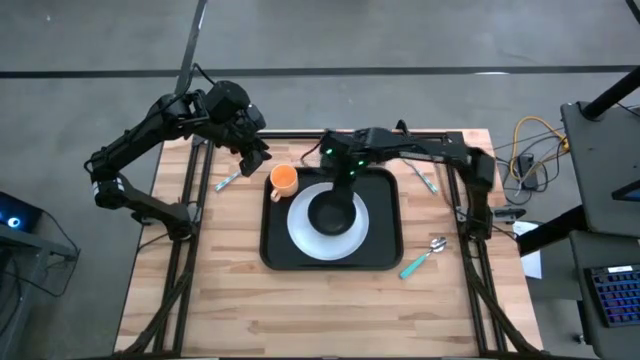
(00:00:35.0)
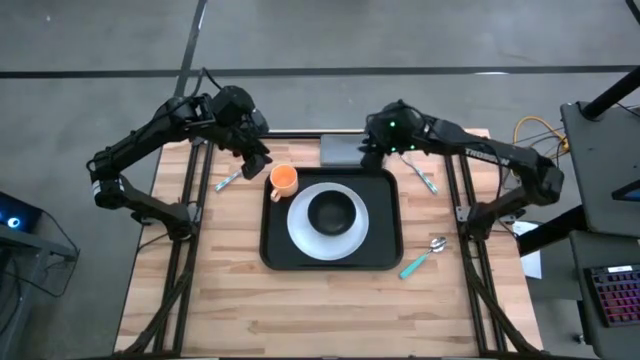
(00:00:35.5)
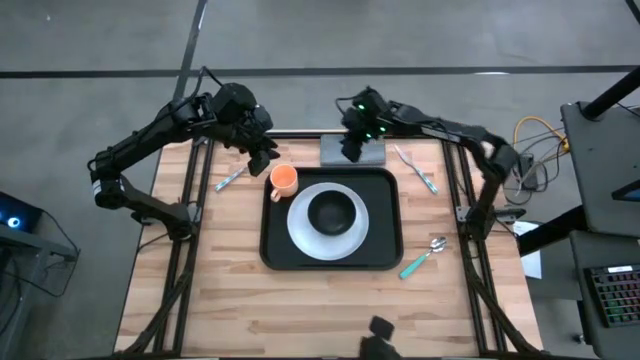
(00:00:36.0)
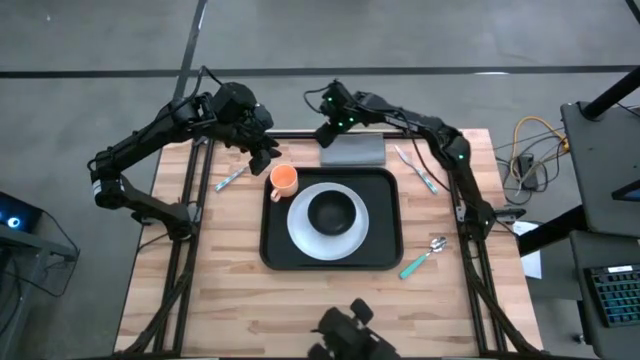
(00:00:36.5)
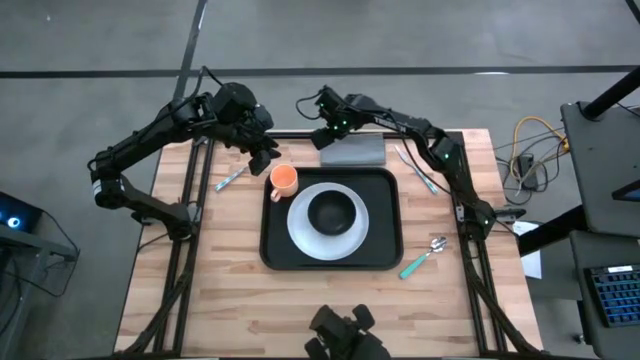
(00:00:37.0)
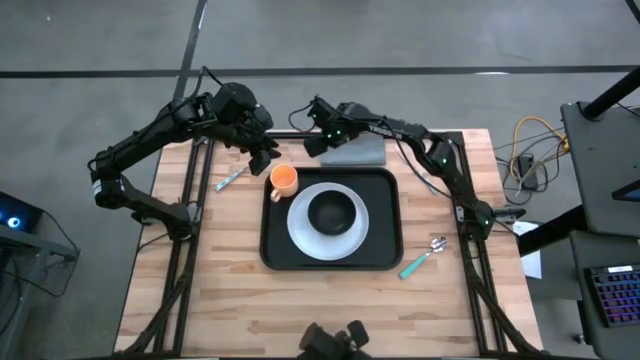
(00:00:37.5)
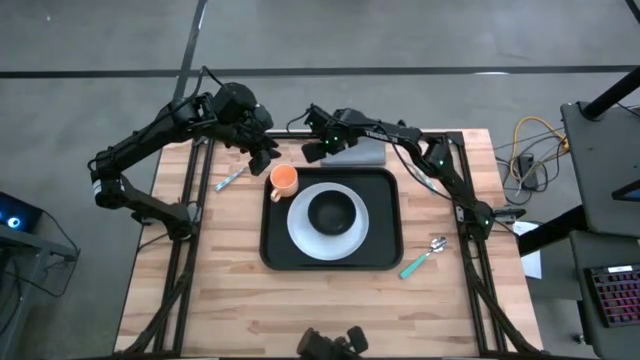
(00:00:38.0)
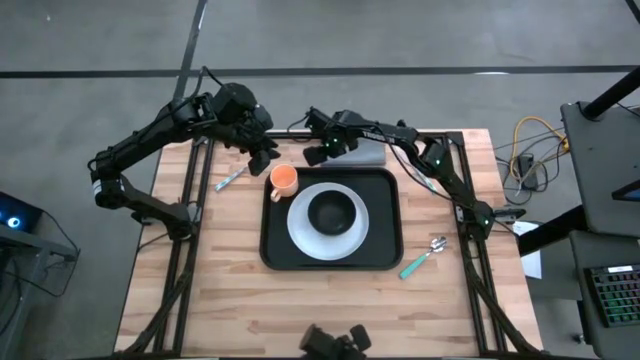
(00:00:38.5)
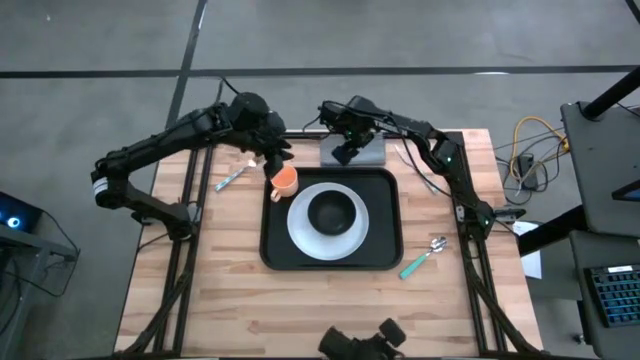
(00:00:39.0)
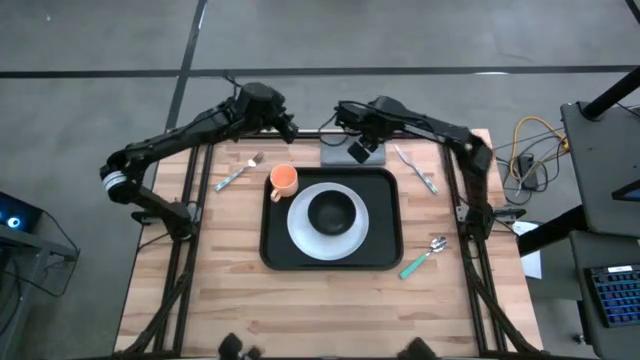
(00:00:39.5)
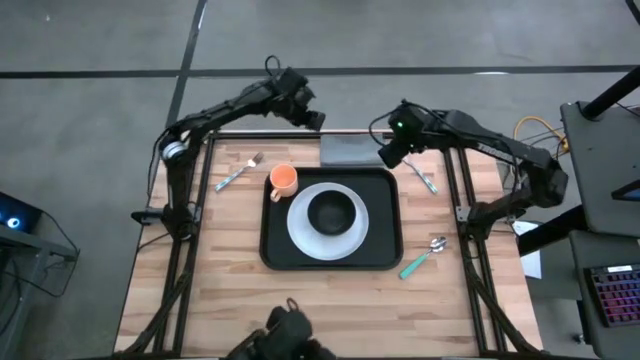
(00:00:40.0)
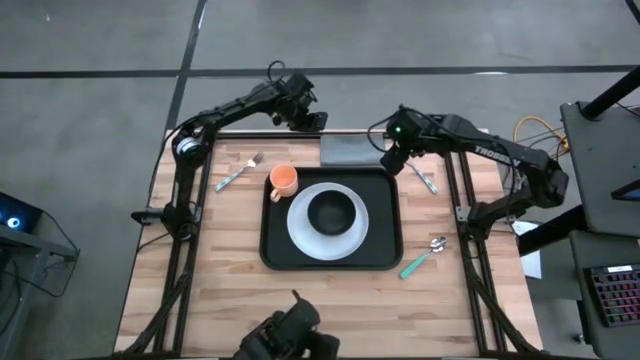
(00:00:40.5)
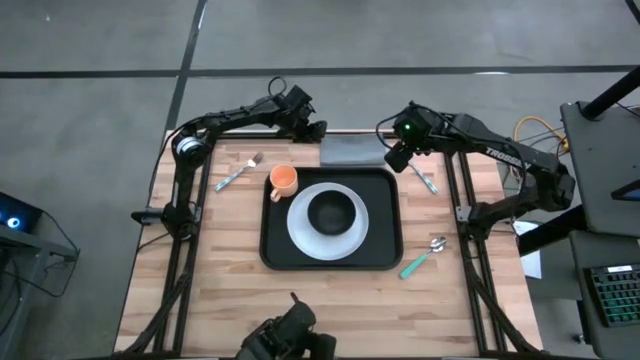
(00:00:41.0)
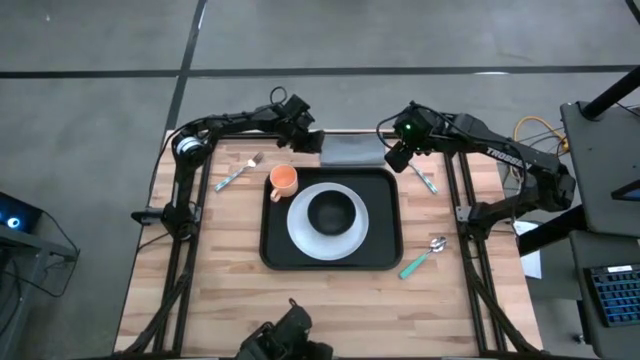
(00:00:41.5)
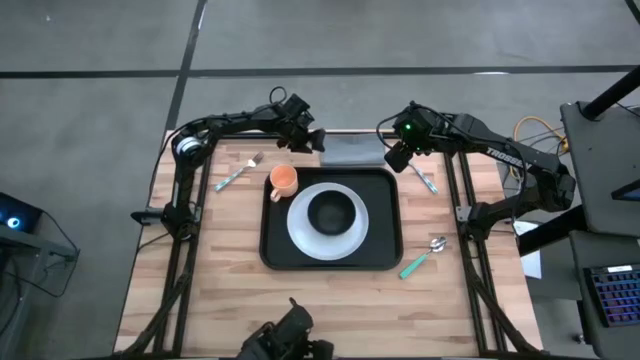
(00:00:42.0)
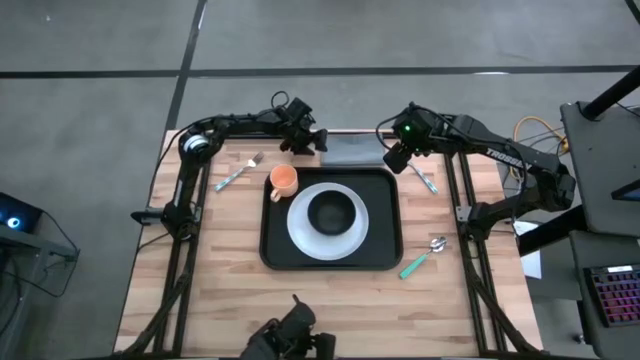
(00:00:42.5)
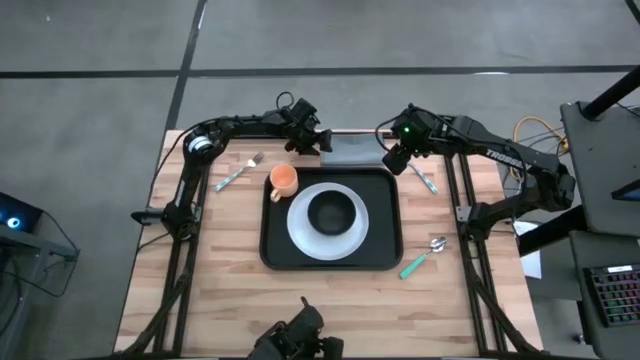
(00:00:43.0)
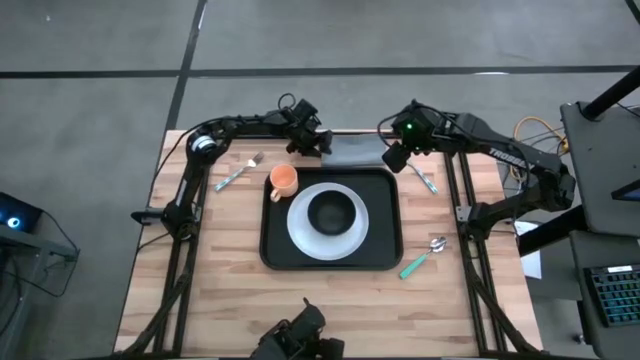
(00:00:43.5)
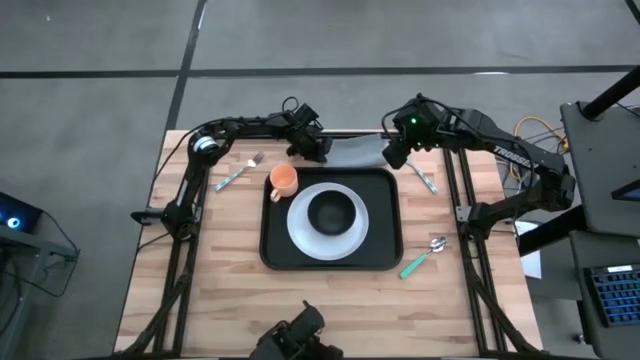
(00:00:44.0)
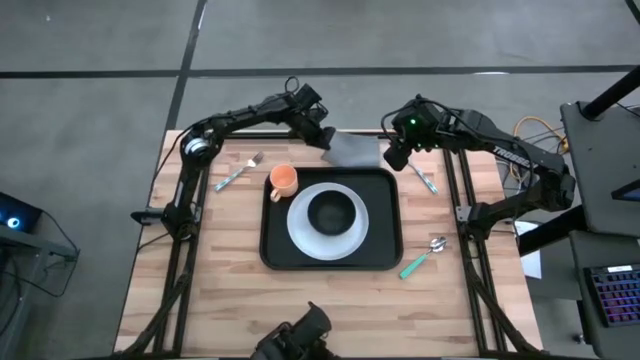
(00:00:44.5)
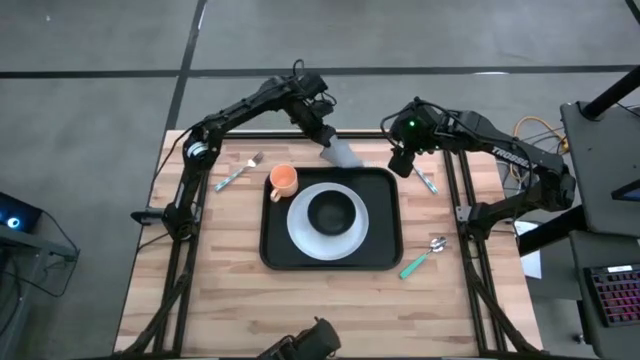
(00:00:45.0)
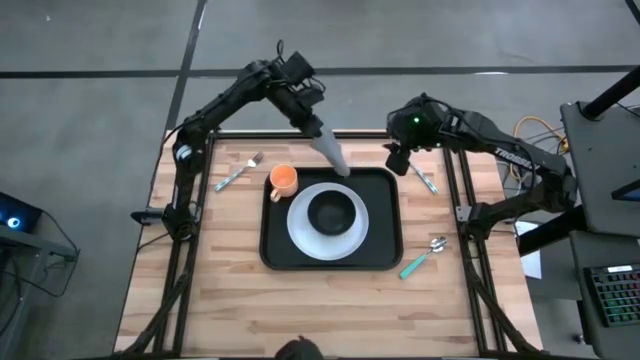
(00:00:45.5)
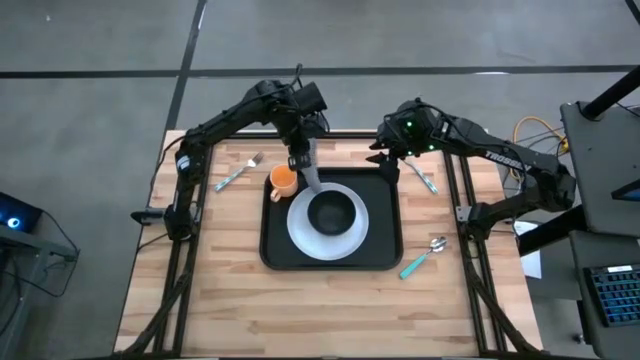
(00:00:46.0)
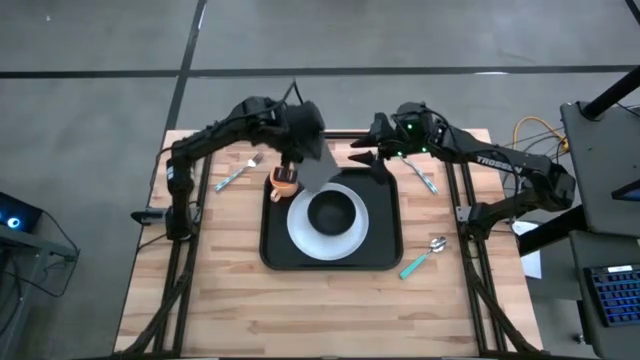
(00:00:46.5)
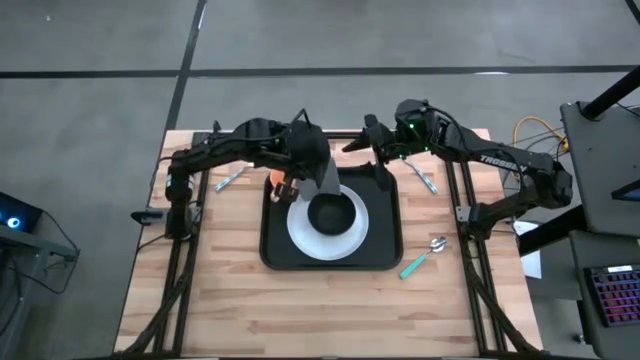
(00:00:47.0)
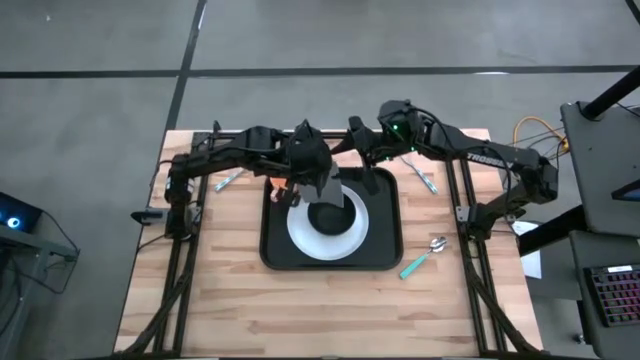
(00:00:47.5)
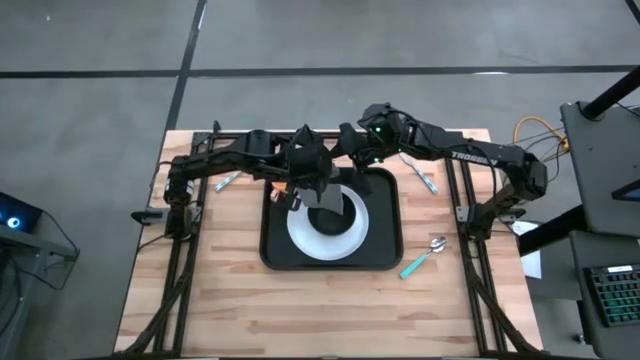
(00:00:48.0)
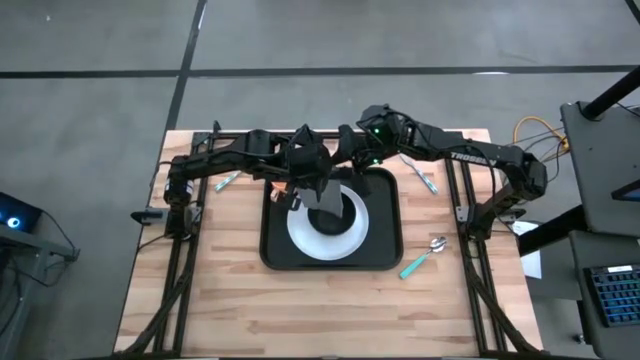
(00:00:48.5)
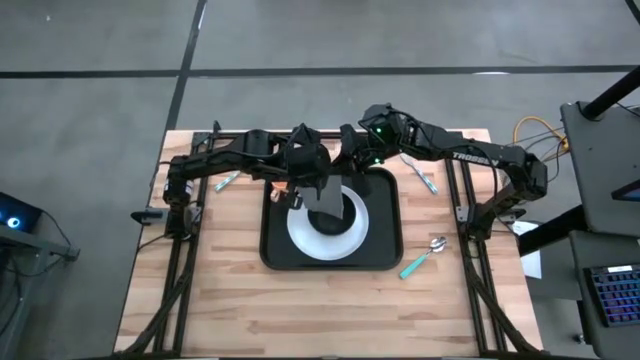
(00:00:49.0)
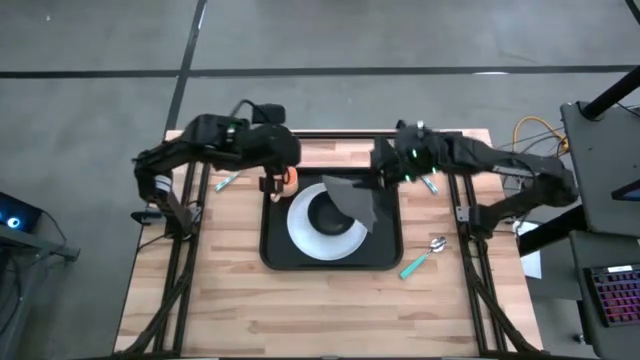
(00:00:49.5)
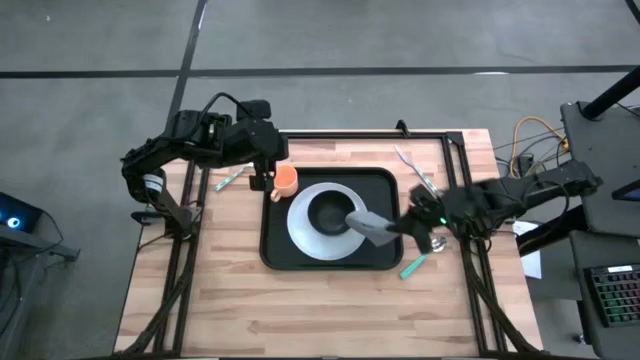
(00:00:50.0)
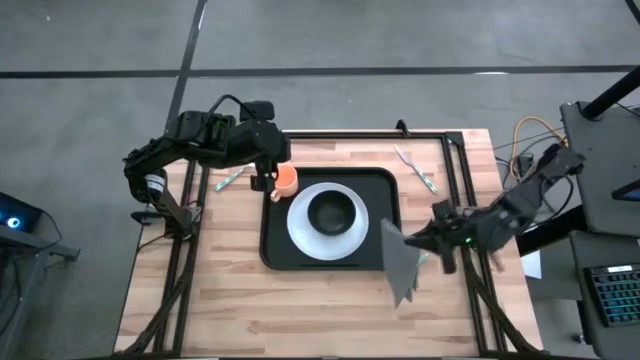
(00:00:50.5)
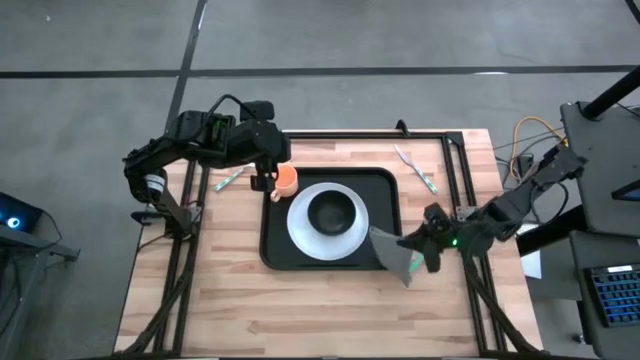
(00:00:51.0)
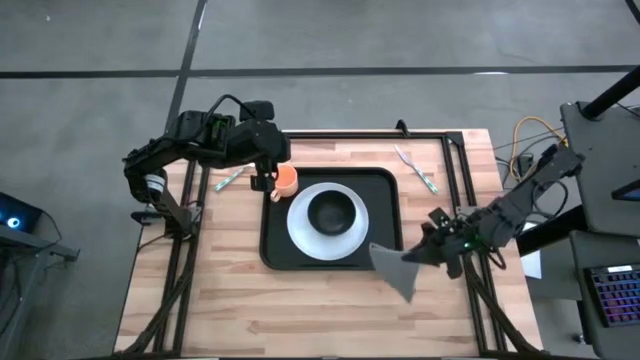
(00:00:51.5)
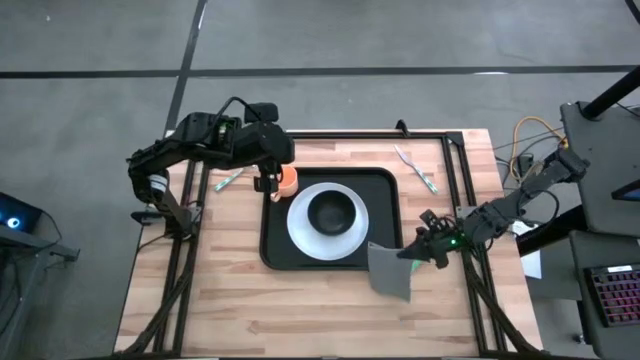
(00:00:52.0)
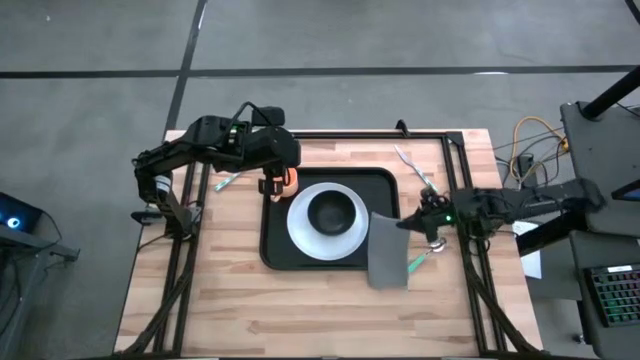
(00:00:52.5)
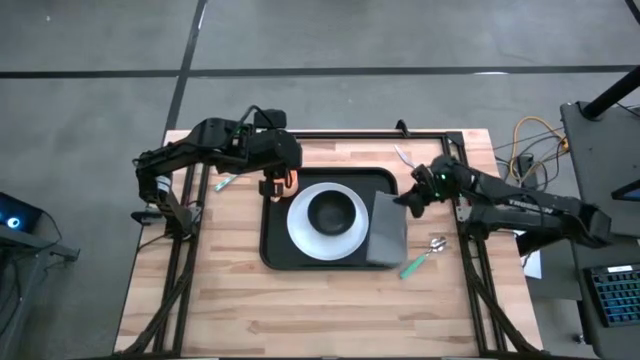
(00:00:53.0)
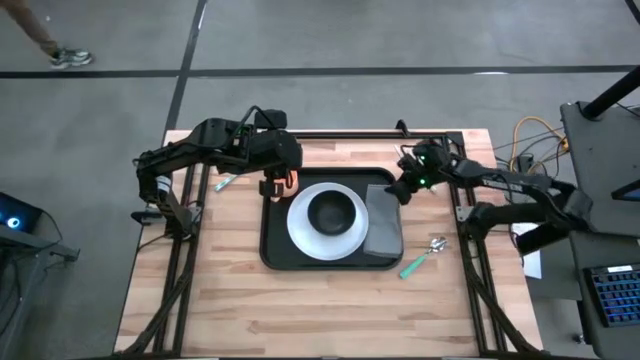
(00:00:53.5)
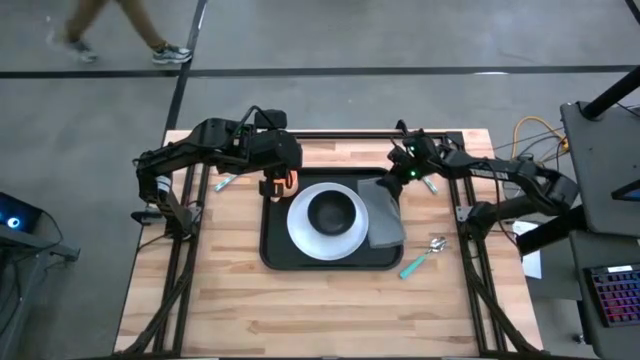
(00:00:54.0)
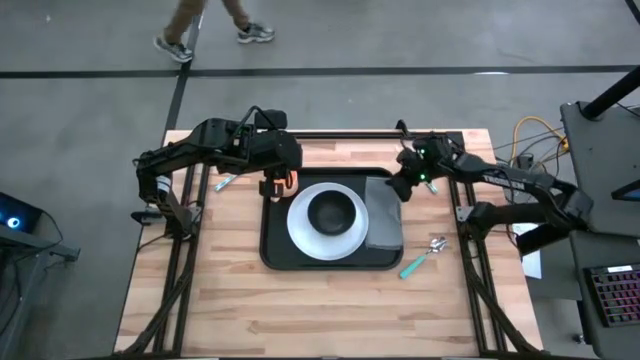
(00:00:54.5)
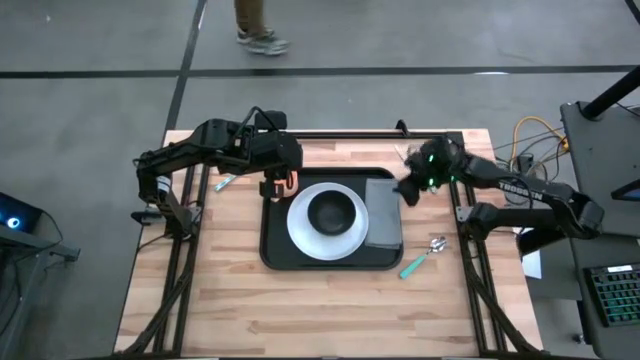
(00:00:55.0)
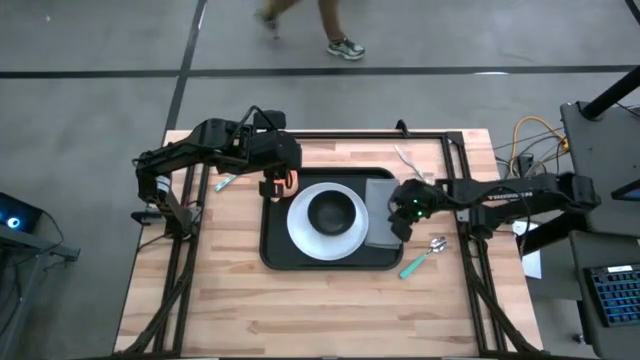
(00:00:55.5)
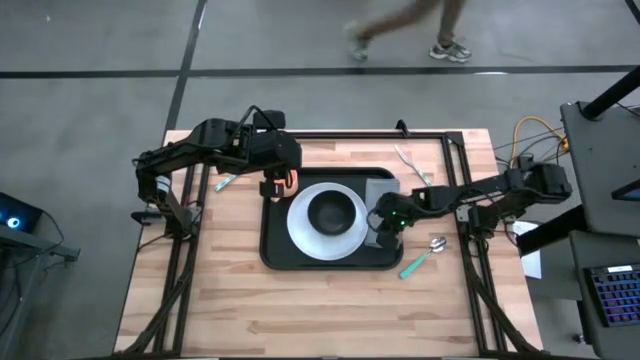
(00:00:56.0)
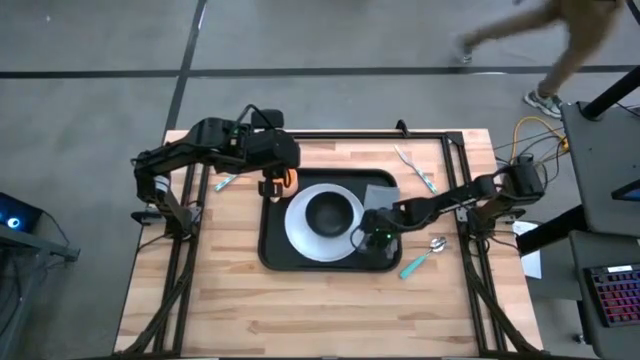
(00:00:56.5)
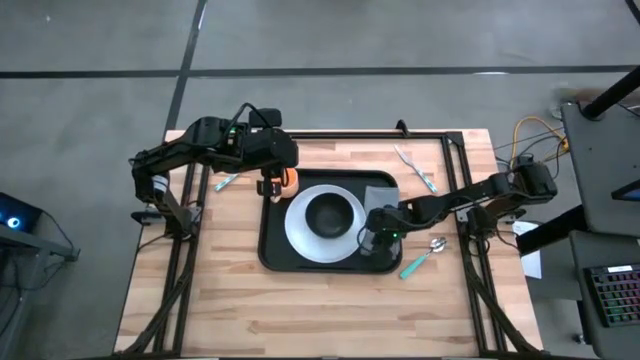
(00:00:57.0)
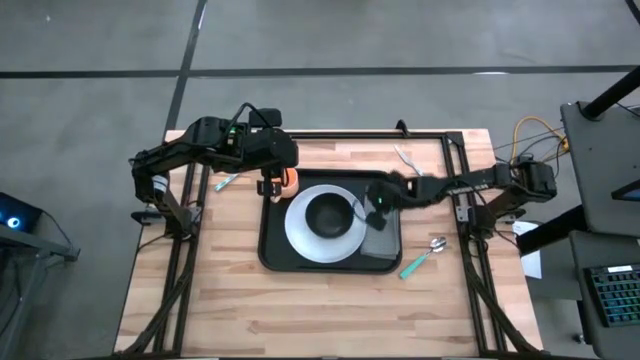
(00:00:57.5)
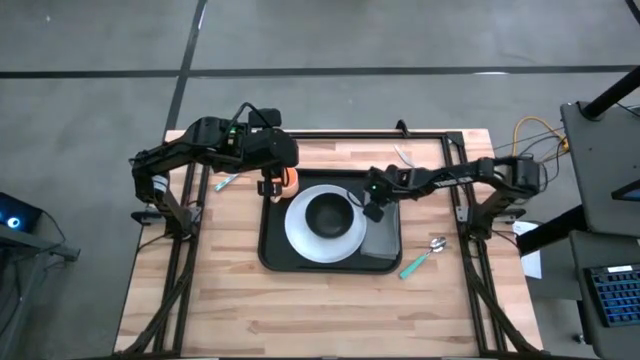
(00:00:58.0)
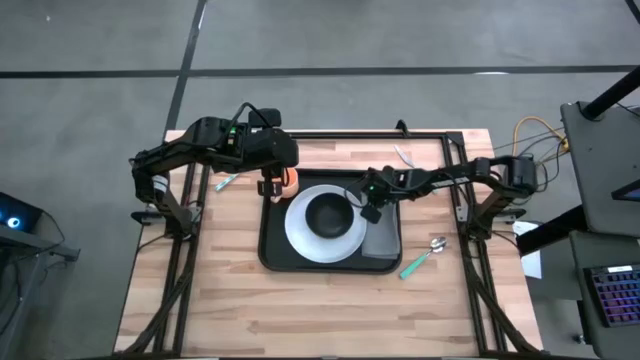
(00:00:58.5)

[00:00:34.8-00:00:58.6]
Task: Set up tray
Put the table gray napkin to the right of the white plate on the black serving tray
